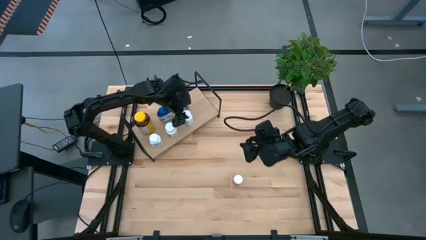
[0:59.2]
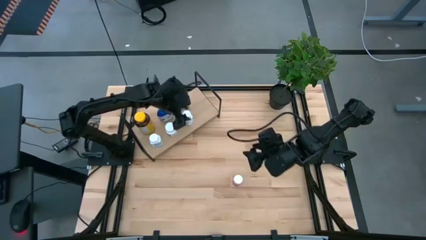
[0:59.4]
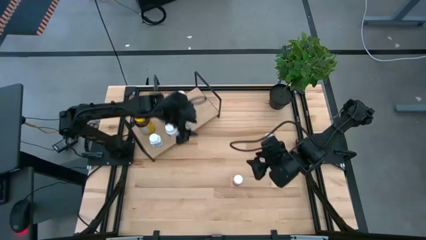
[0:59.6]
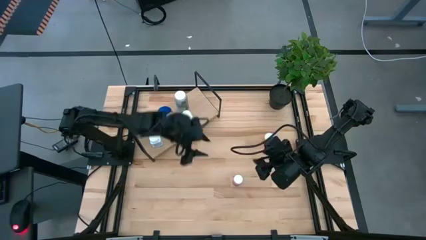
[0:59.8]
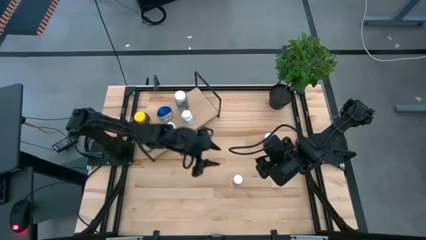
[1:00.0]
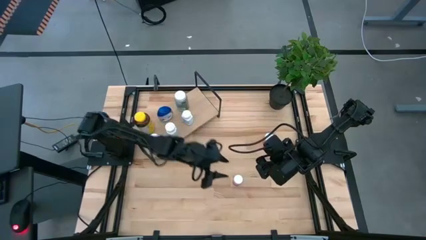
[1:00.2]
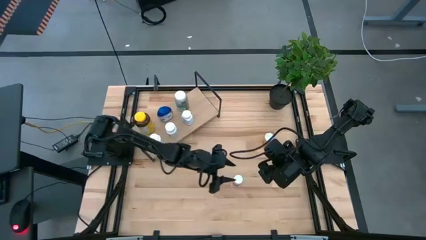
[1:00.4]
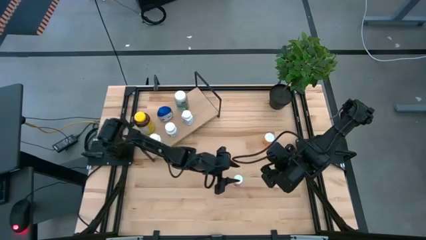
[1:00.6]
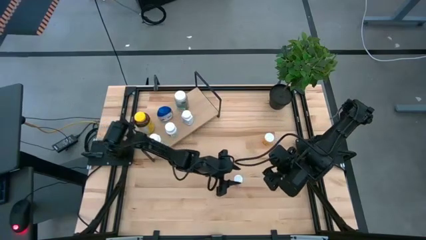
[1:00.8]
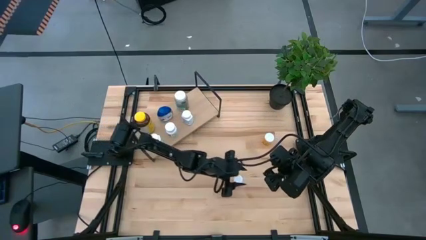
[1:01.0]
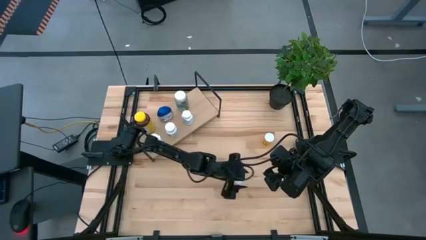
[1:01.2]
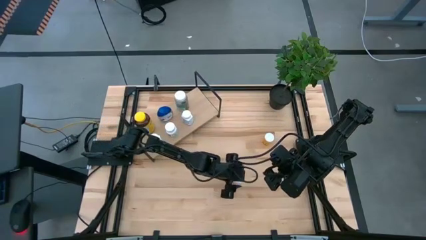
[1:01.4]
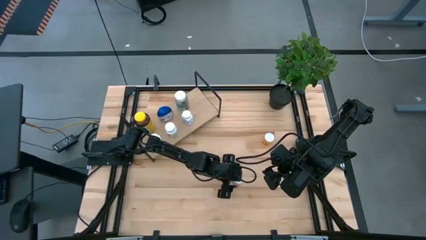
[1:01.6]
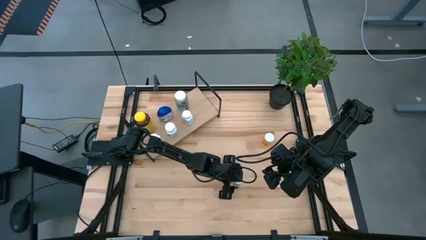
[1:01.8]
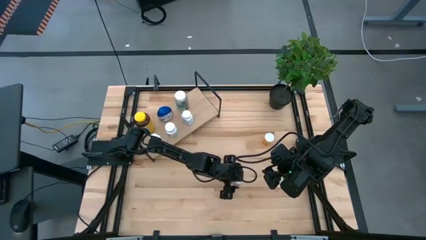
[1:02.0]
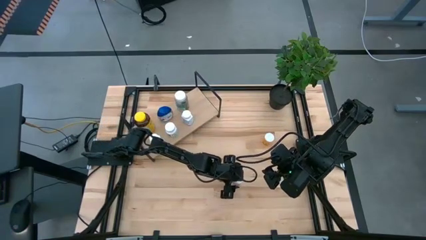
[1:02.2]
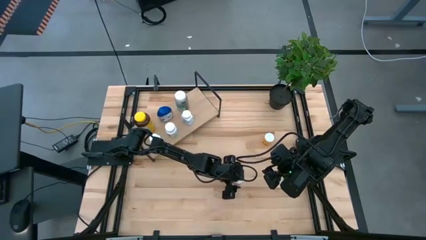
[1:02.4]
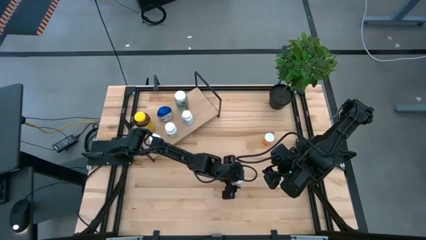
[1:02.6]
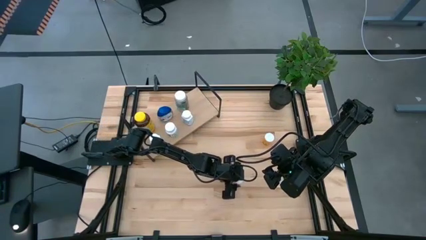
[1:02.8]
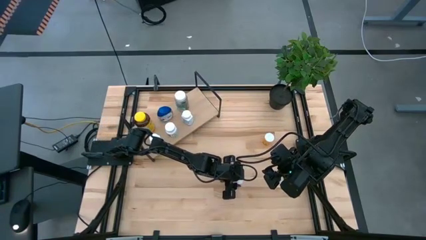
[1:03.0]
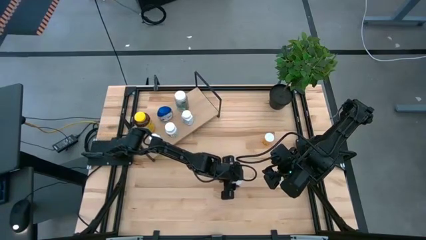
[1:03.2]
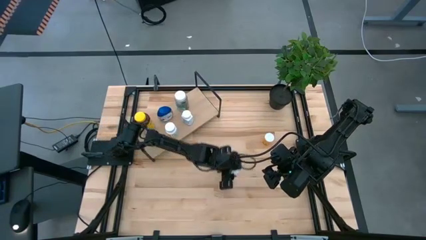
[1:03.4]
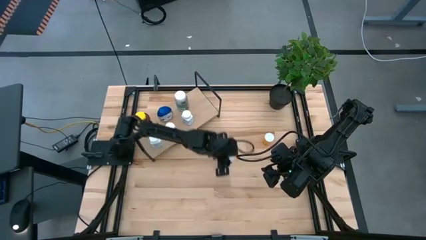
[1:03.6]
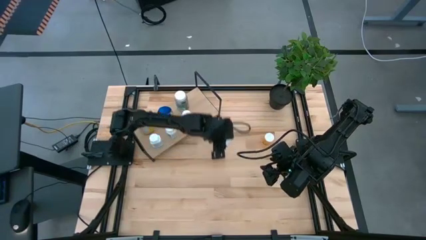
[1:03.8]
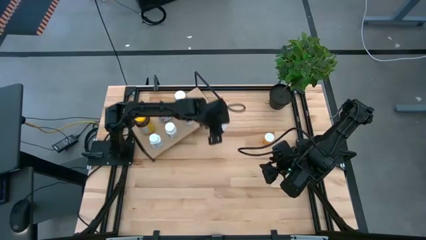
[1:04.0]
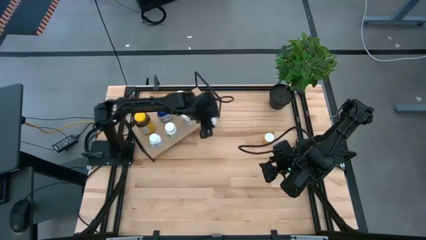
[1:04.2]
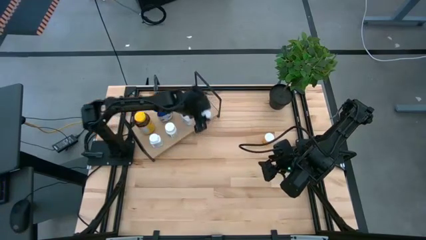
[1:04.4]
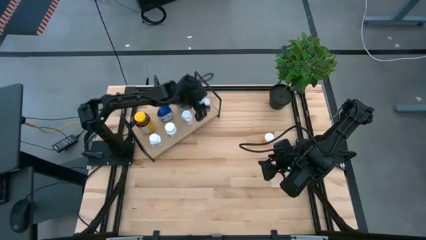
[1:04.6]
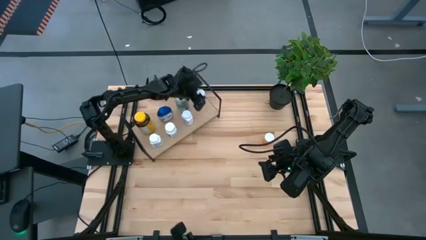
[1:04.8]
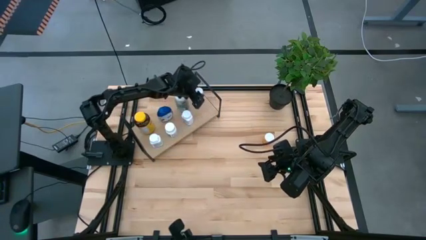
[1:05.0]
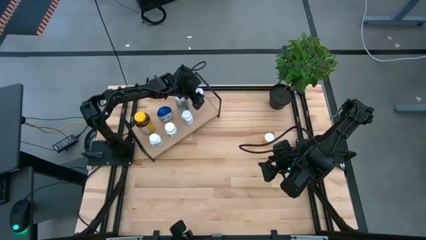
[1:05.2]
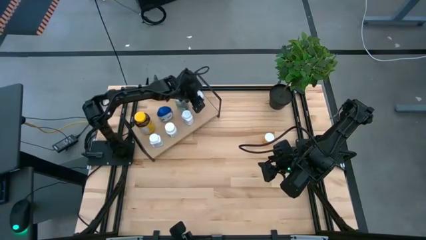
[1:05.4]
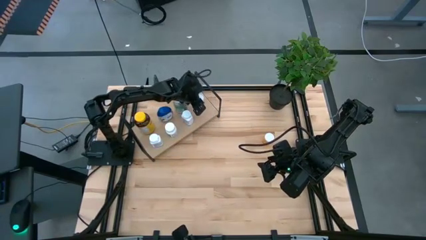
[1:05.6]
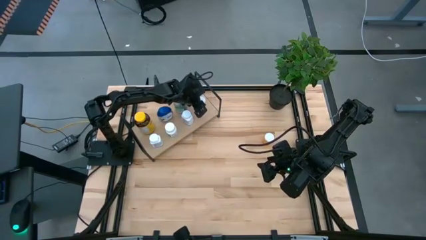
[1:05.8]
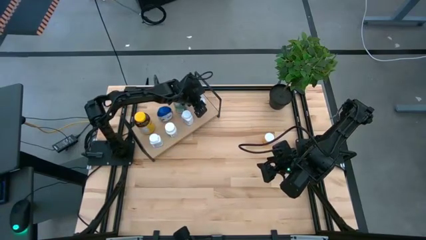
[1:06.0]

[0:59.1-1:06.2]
Task: Pick and place medicine bottles onto shelf by color
Put the pink medicine bottle on the shelf

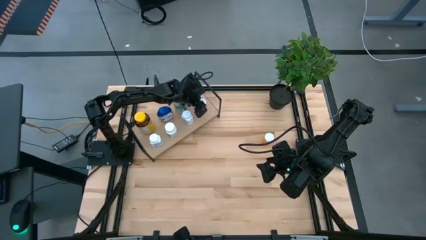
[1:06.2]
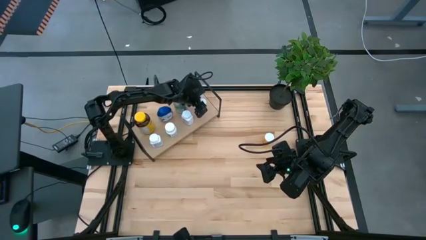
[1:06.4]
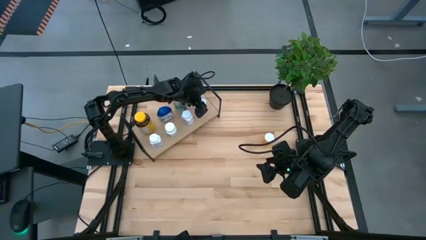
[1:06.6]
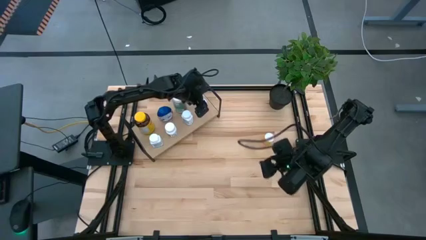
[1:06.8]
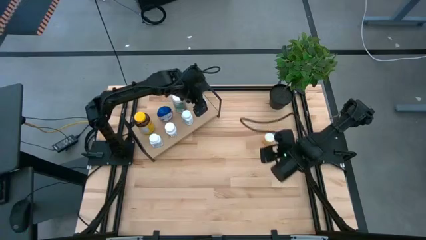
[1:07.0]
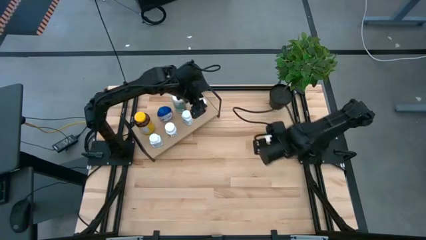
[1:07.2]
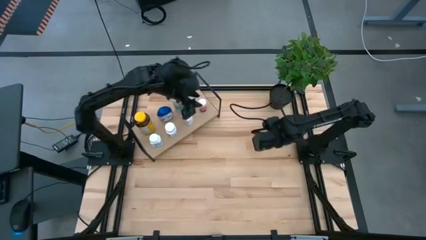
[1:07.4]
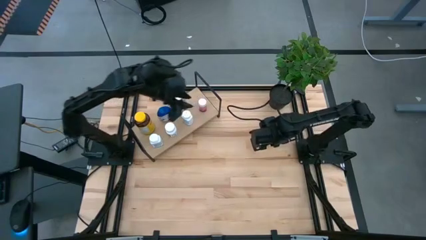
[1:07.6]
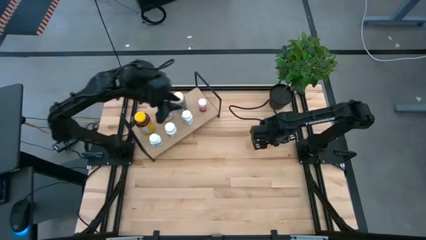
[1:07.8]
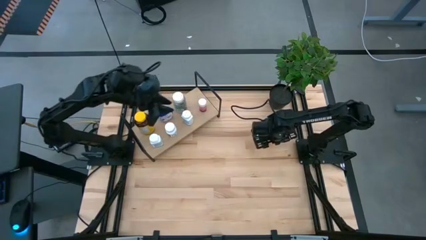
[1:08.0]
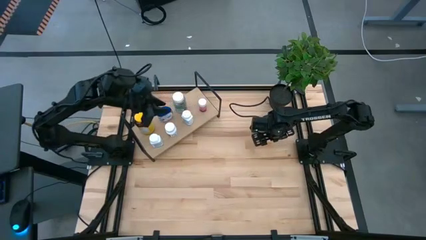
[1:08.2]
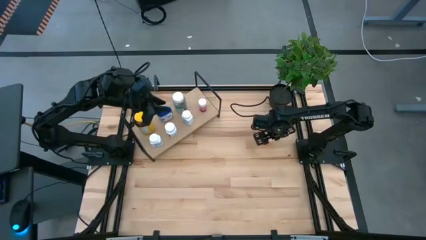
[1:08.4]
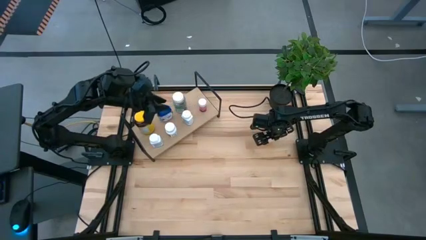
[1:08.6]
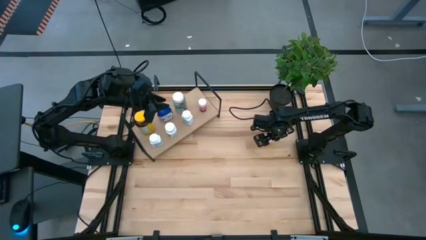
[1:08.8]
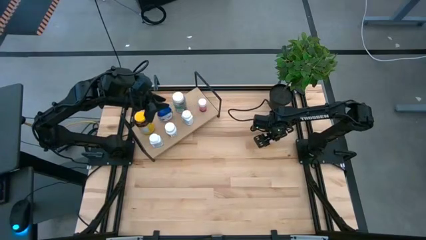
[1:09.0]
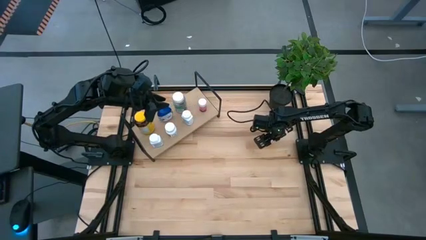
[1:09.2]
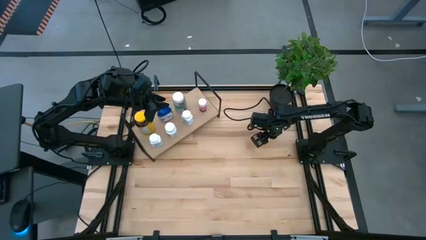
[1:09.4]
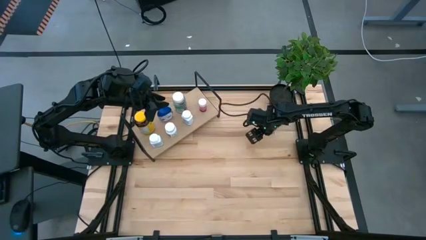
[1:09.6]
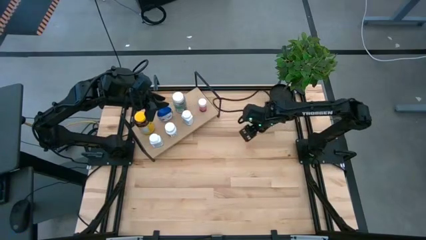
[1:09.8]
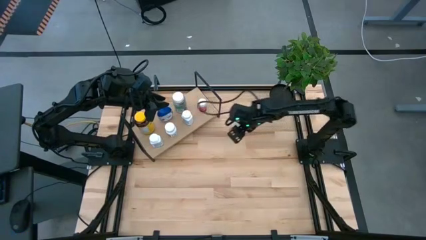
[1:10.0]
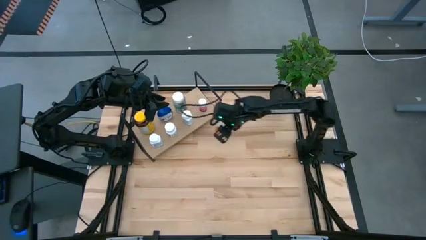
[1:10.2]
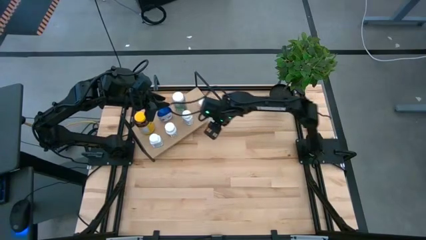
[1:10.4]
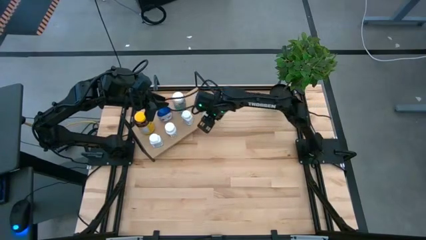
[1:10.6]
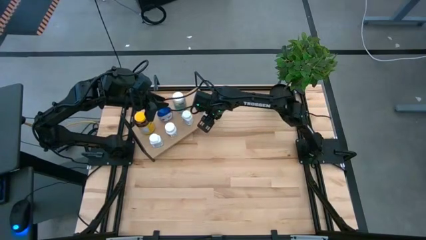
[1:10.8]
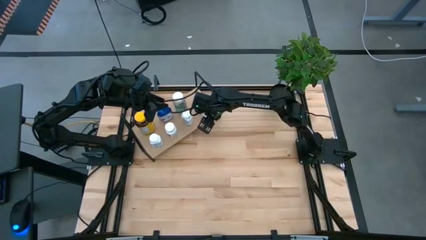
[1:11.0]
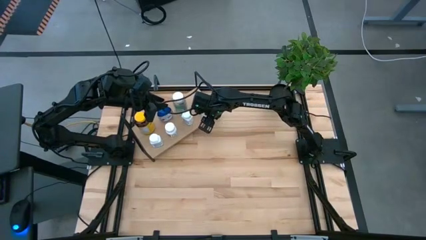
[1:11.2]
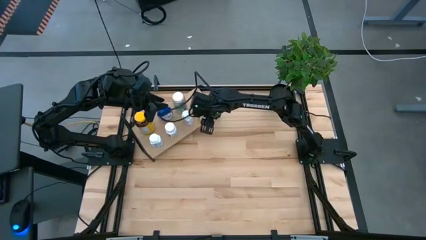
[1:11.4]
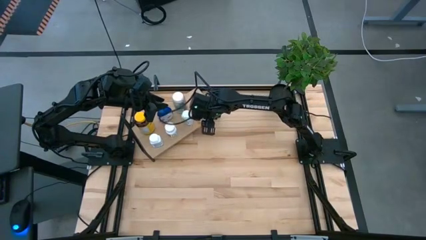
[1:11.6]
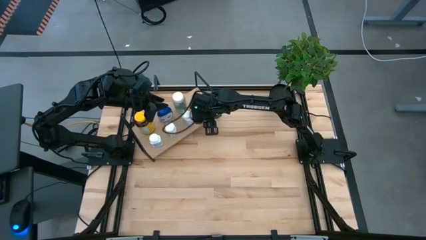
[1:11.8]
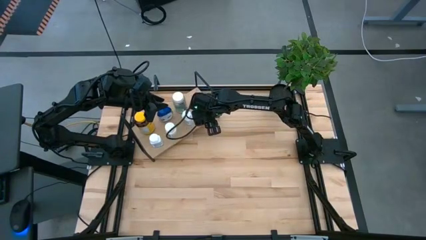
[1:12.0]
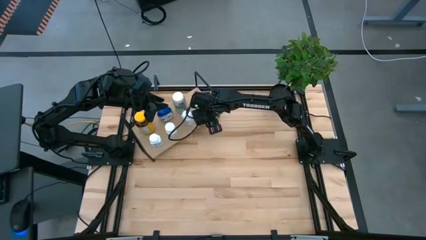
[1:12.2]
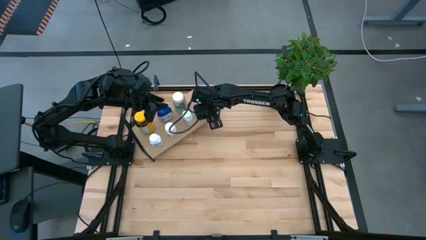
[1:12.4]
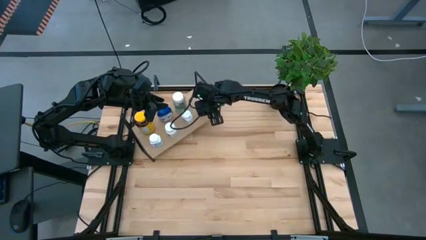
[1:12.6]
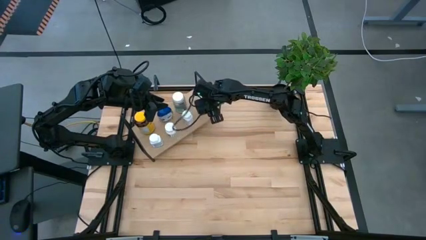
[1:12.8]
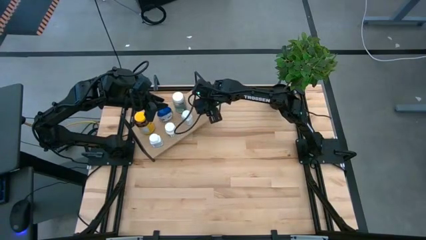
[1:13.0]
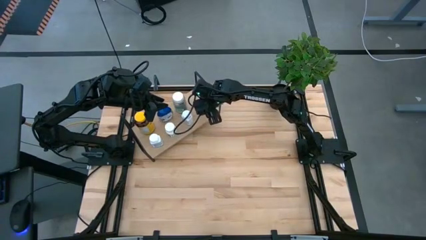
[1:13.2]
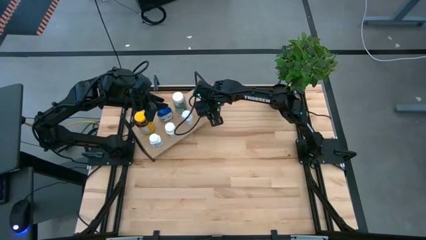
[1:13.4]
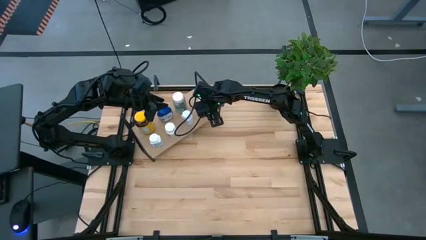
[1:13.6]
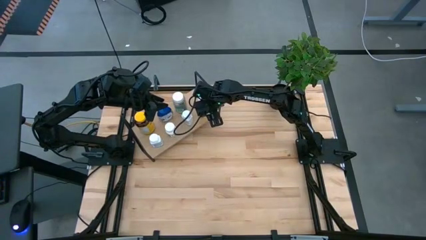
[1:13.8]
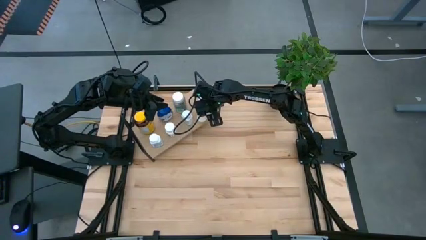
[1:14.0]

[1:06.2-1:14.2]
Put the orange pill bottle on the shelf
